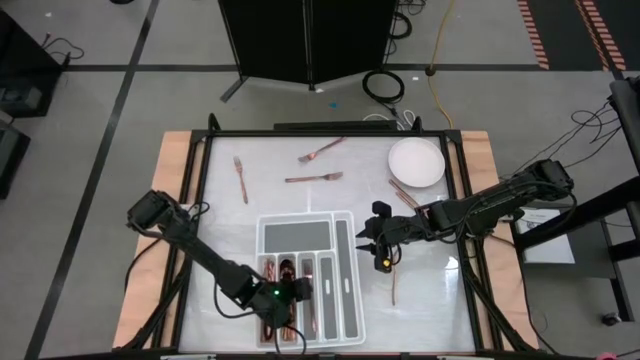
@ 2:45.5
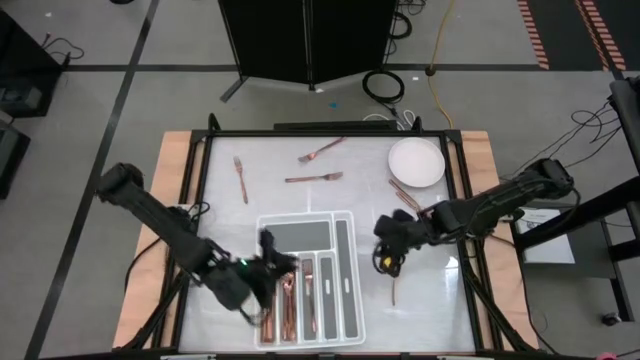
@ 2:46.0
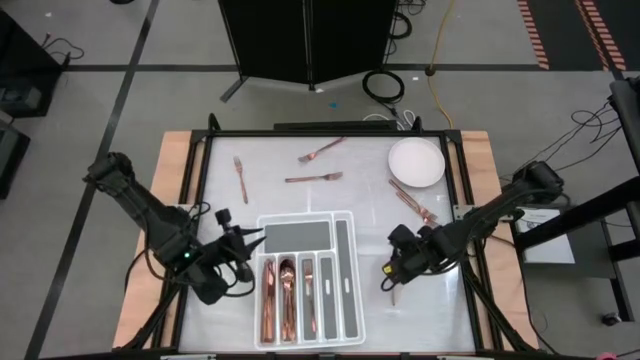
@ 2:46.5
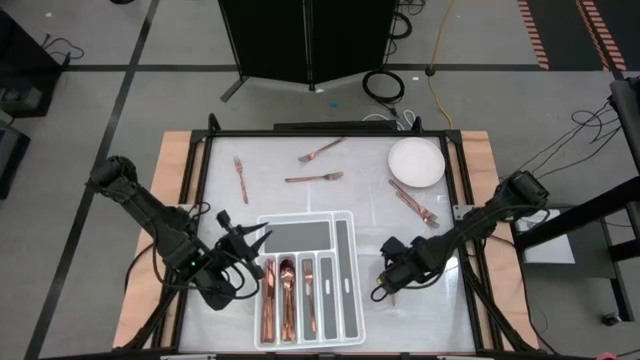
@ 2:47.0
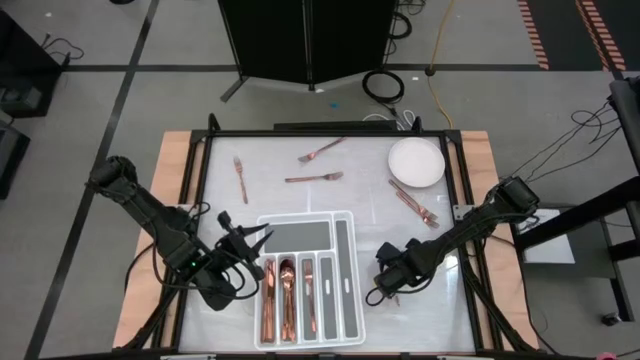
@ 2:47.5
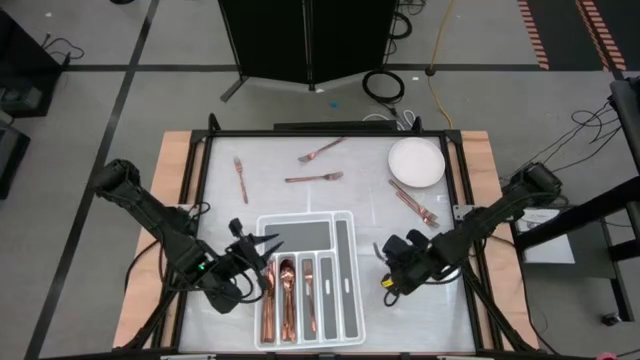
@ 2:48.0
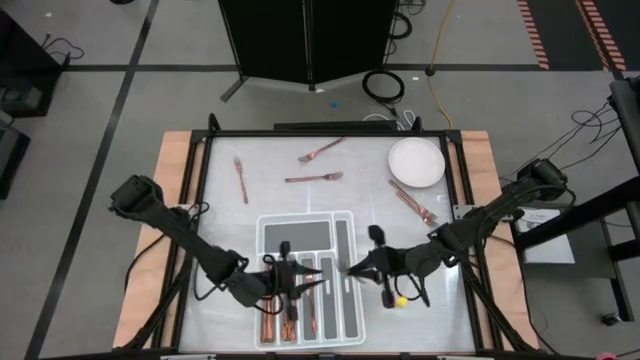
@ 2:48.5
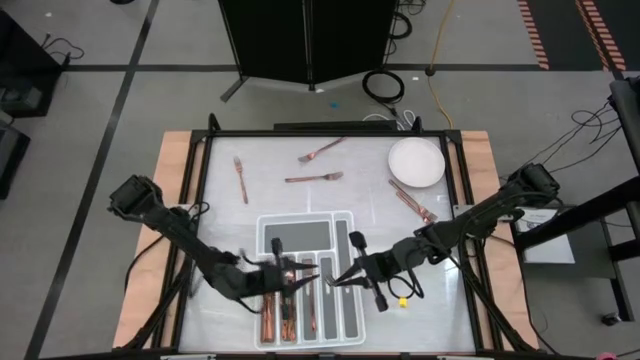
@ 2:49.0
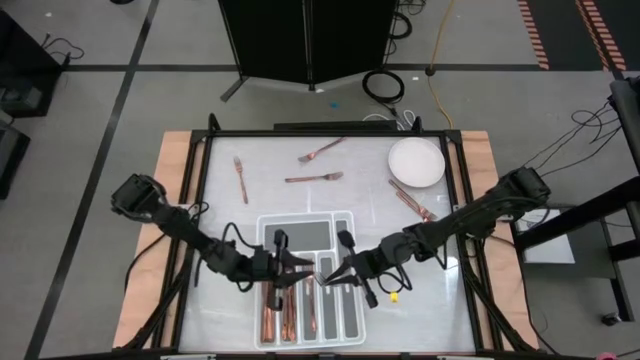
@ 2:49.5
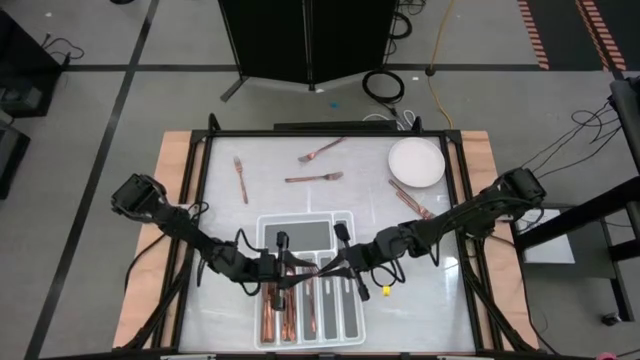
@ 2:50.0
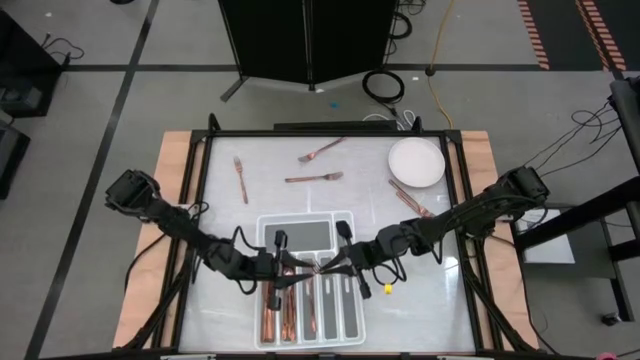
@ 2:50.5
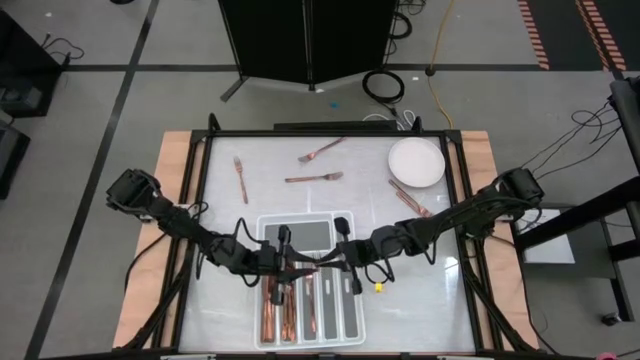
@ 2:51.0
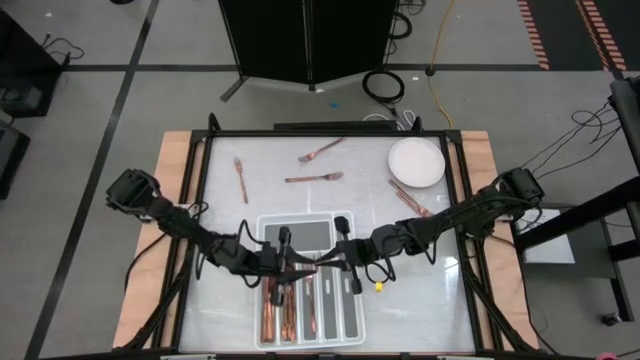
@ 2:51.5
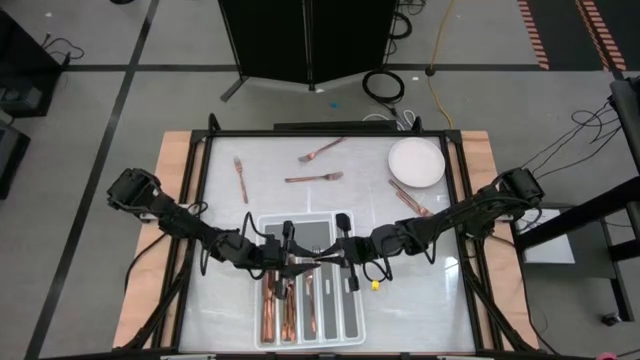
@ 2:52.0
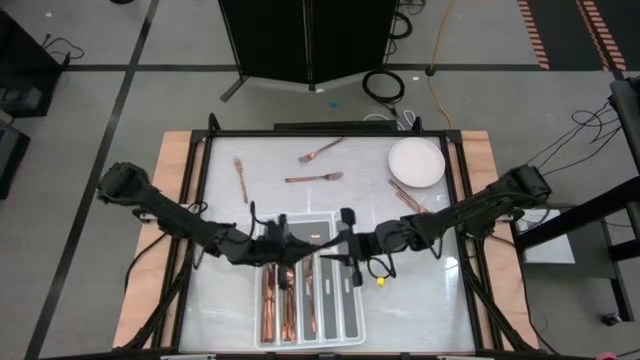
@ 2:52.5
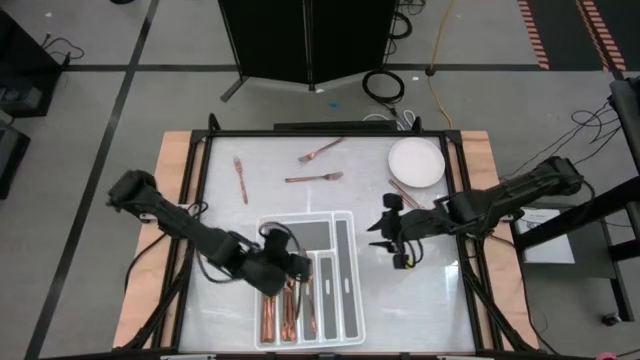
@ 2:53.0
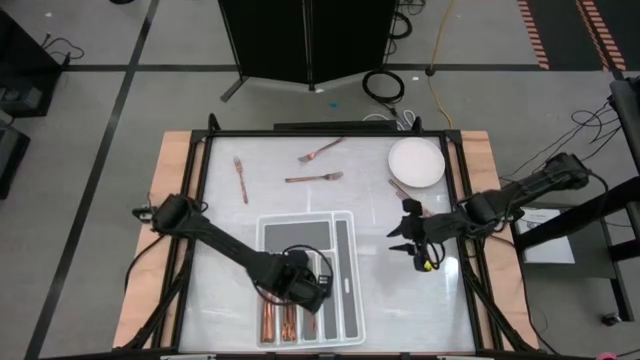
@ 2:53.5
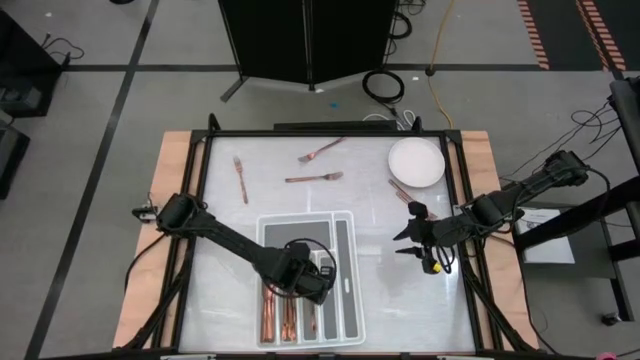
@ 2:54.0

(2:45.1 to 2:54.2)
Task: Sort silverware
Put the fork into the silverware tray

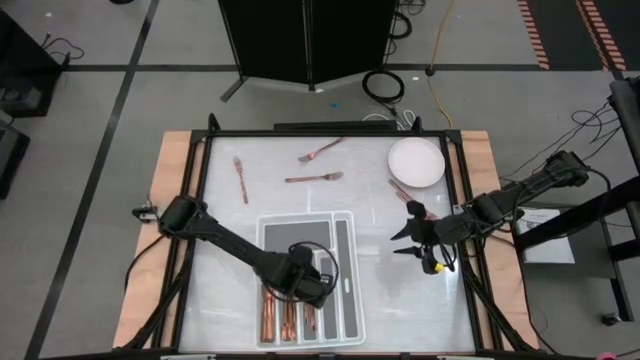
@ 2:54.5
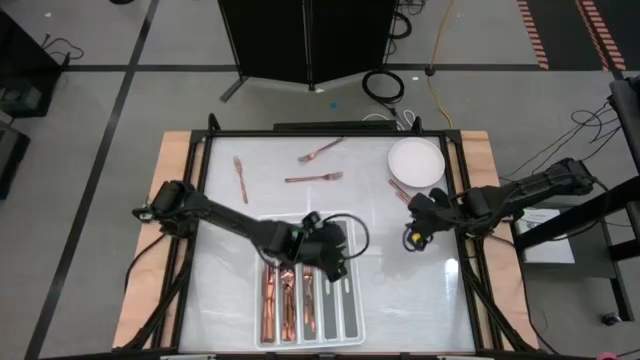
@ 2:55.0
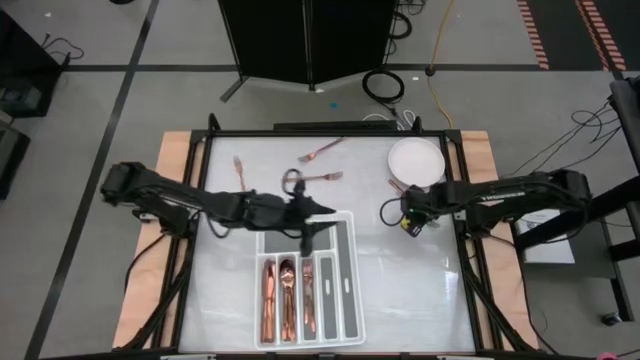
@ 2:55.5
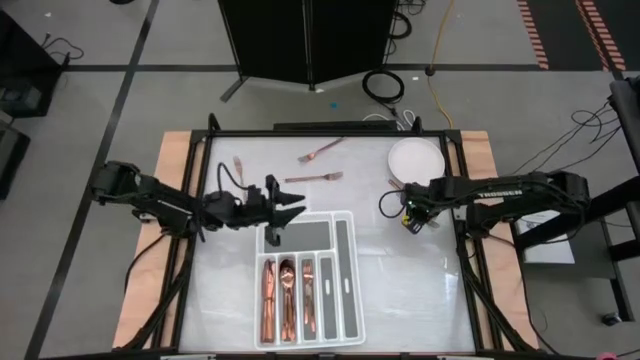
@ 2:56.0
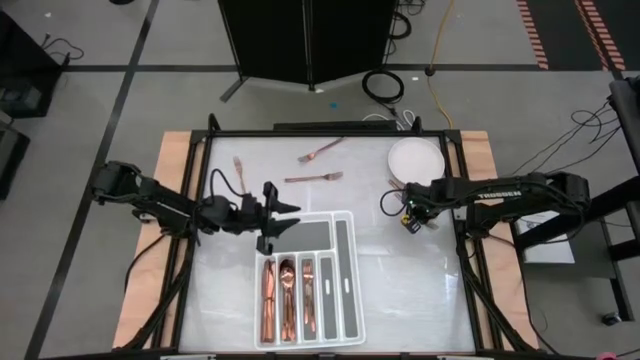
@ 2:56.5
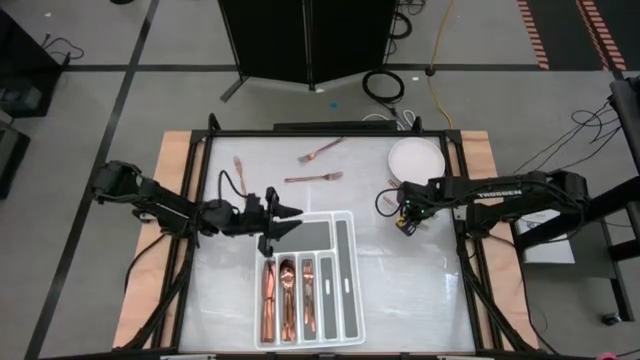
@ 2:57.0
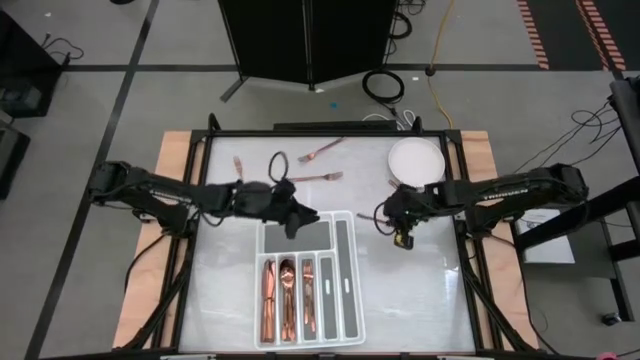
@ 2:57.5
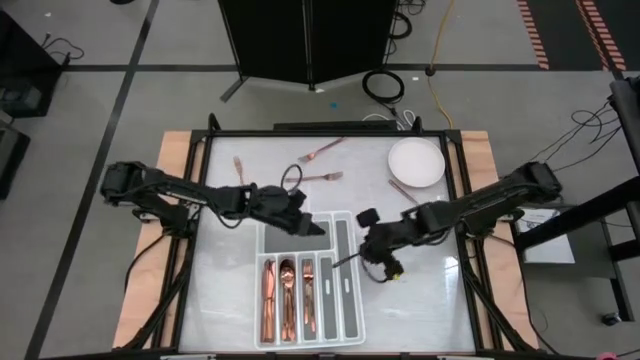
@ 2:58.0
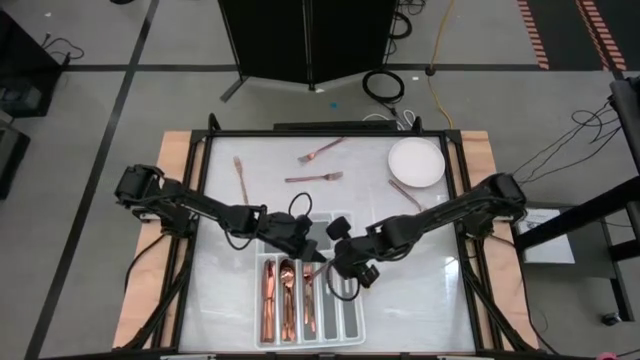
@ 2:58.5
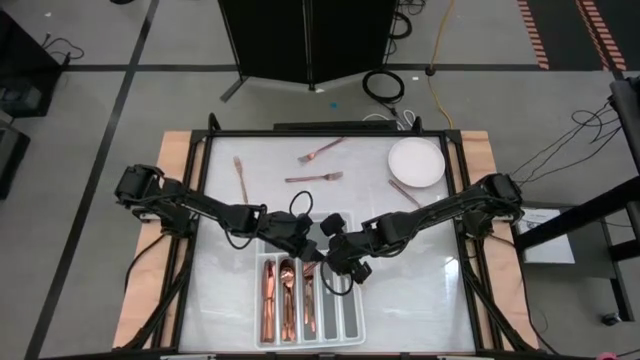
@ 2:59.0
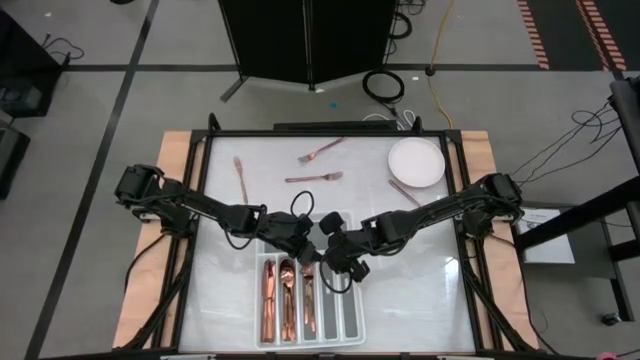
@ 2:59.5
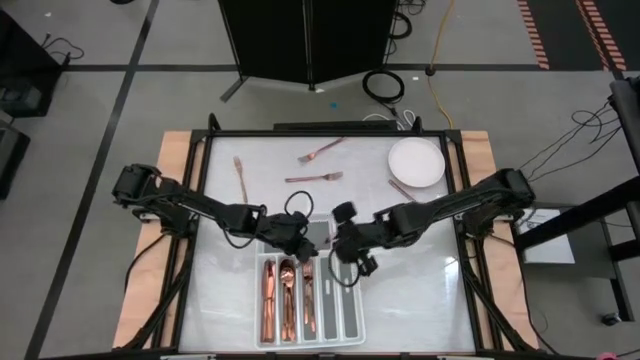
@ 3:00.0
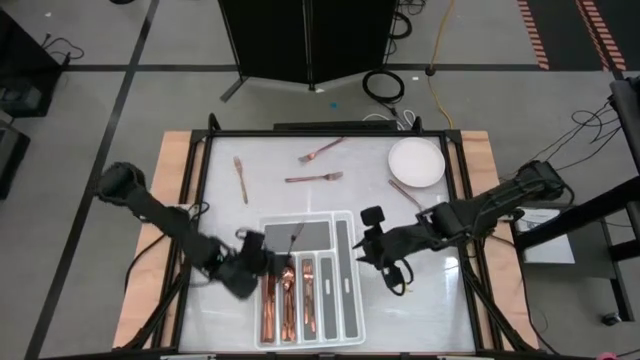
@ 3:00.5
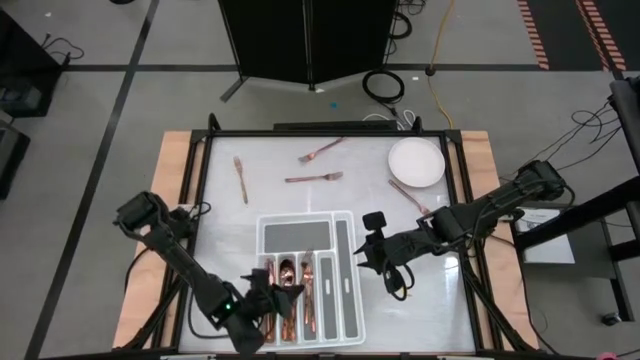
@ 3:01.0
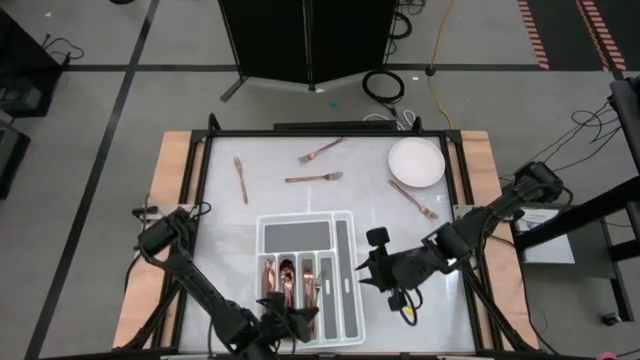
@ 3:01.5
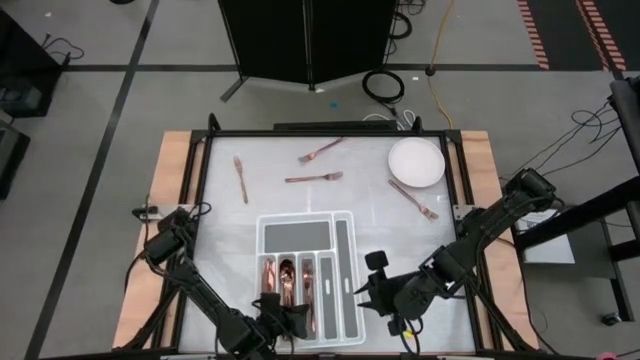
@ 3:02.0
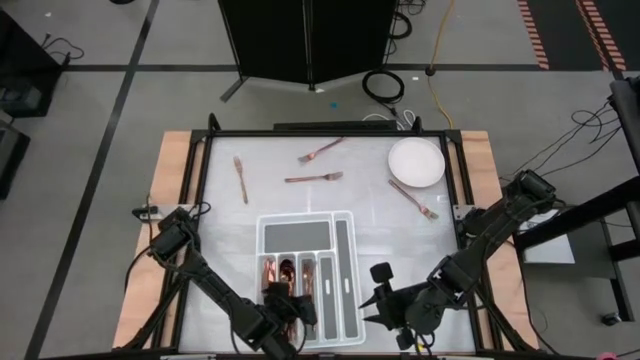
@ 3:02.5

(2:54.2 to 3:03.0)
Put the fork into the silverware tray
